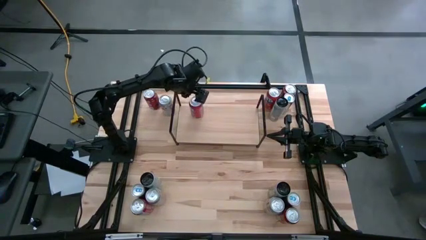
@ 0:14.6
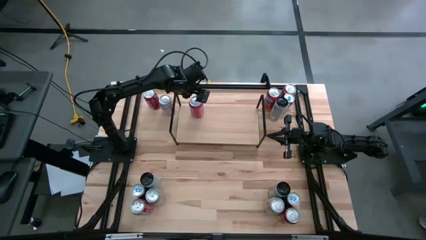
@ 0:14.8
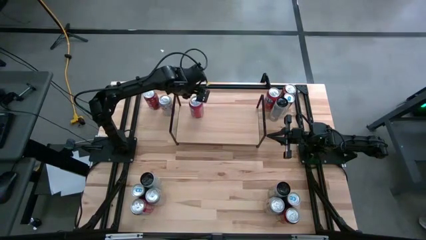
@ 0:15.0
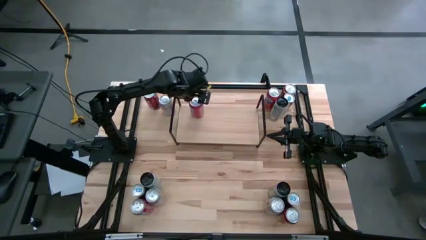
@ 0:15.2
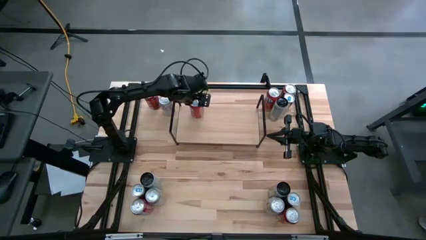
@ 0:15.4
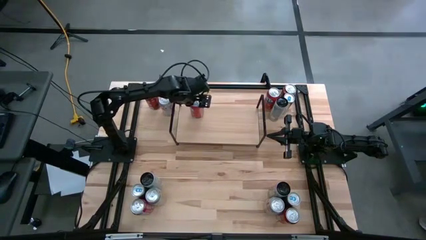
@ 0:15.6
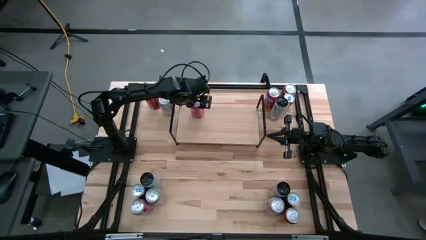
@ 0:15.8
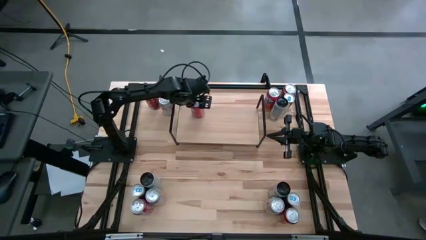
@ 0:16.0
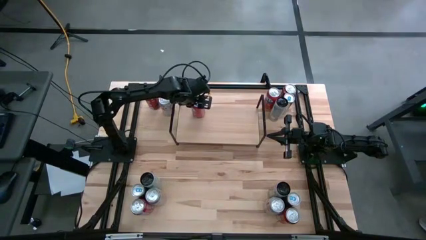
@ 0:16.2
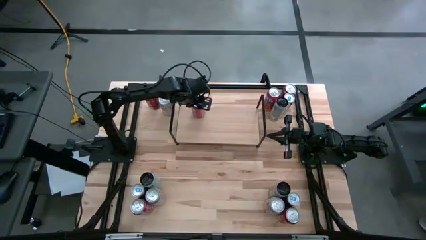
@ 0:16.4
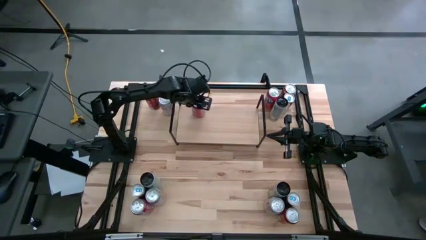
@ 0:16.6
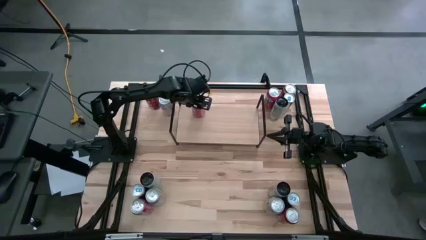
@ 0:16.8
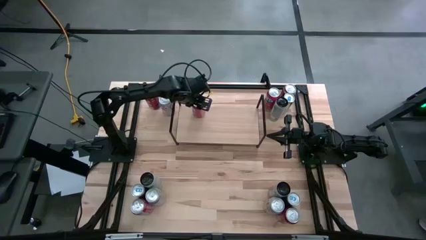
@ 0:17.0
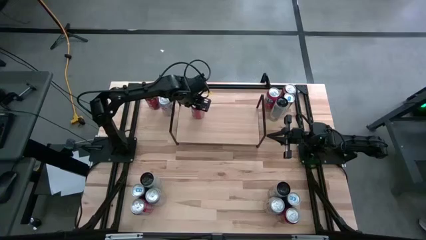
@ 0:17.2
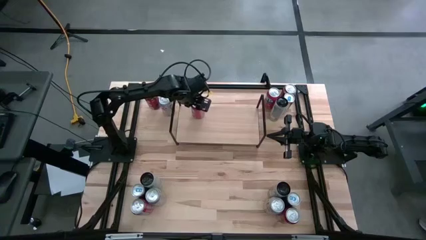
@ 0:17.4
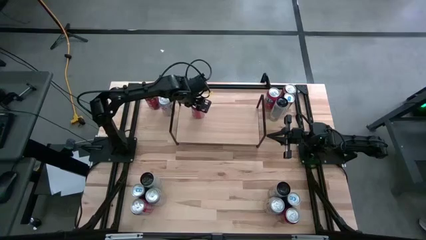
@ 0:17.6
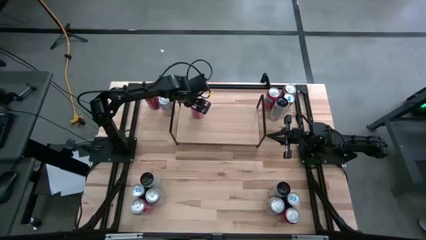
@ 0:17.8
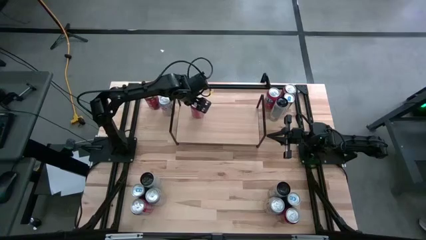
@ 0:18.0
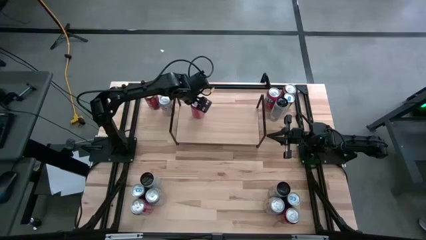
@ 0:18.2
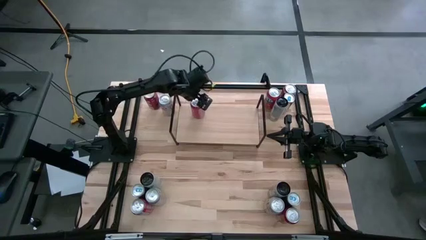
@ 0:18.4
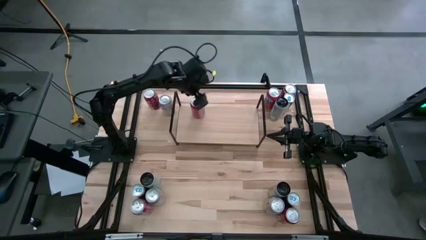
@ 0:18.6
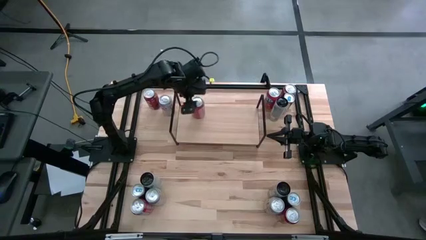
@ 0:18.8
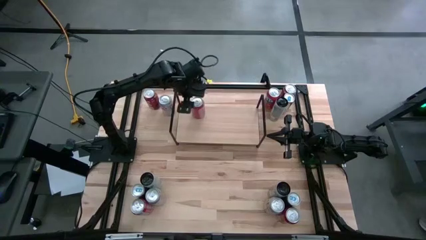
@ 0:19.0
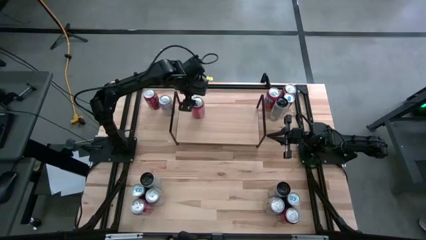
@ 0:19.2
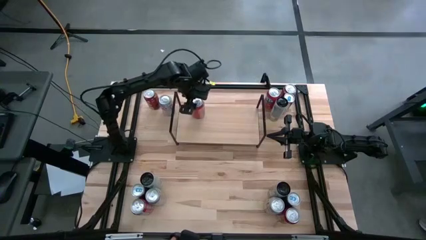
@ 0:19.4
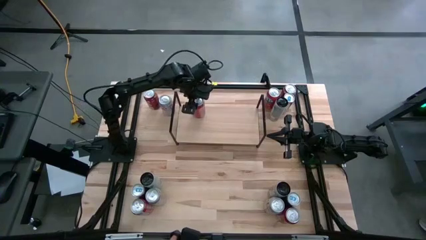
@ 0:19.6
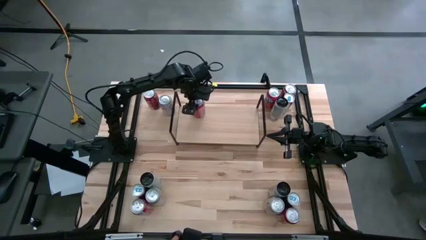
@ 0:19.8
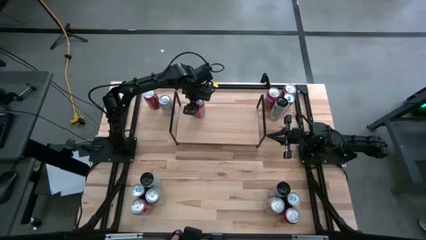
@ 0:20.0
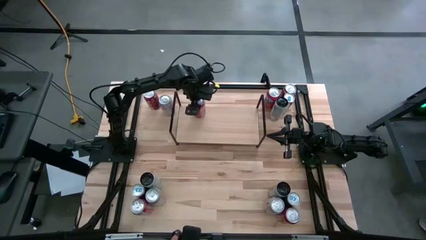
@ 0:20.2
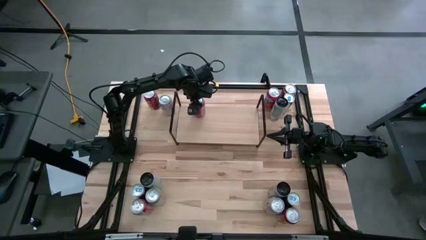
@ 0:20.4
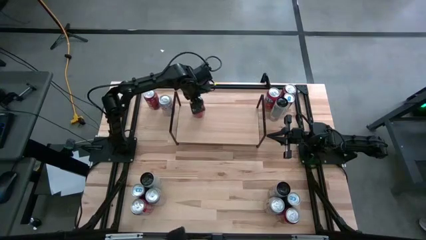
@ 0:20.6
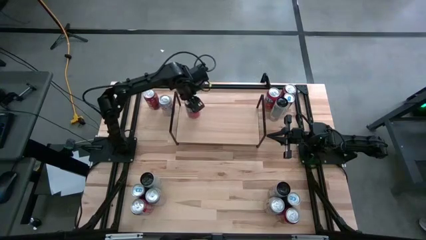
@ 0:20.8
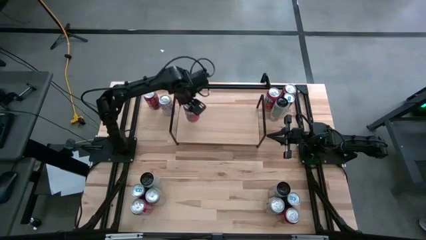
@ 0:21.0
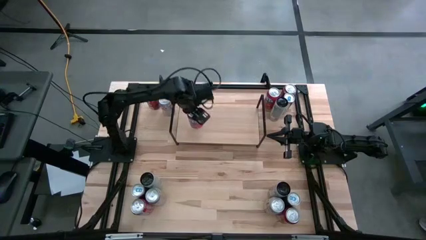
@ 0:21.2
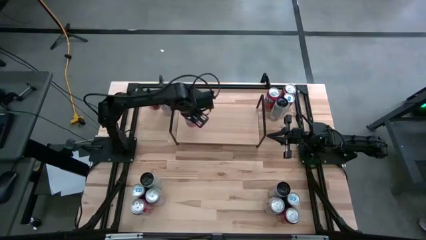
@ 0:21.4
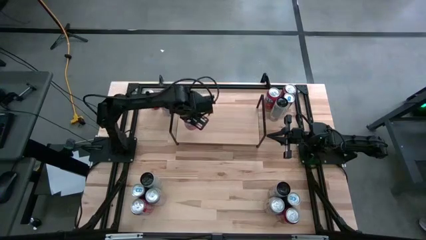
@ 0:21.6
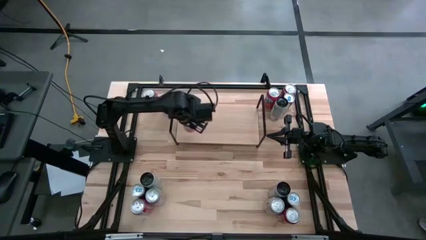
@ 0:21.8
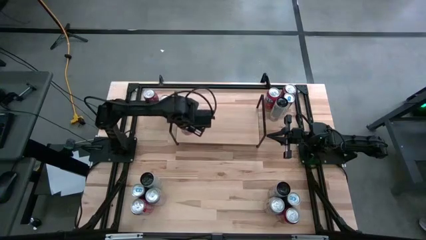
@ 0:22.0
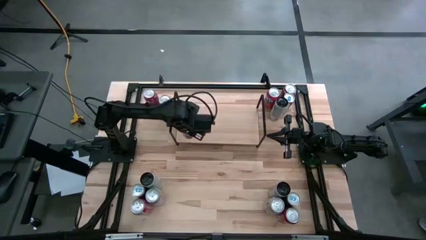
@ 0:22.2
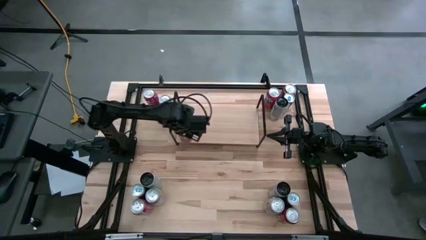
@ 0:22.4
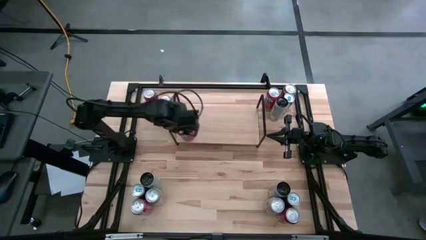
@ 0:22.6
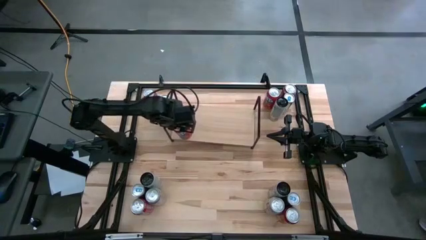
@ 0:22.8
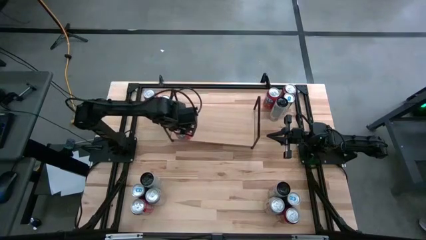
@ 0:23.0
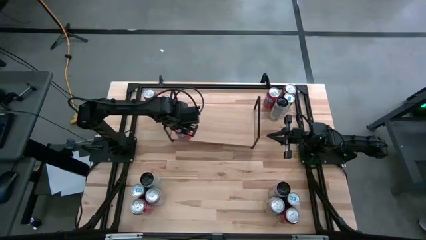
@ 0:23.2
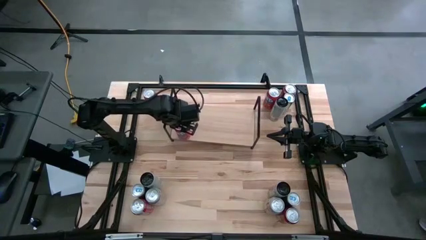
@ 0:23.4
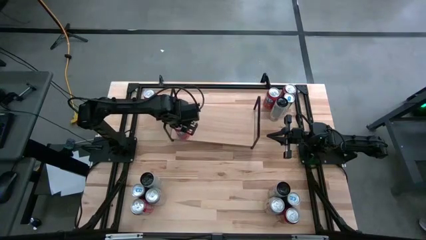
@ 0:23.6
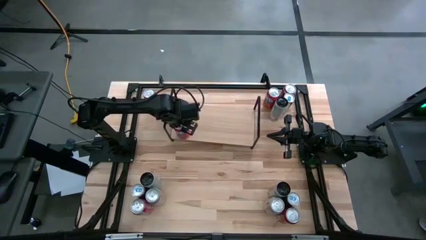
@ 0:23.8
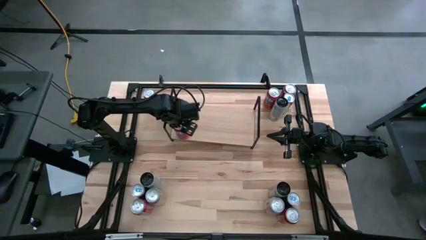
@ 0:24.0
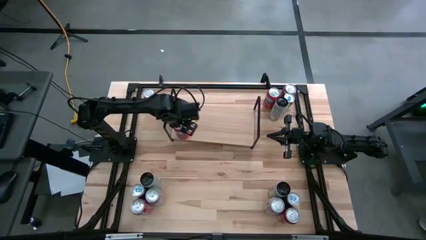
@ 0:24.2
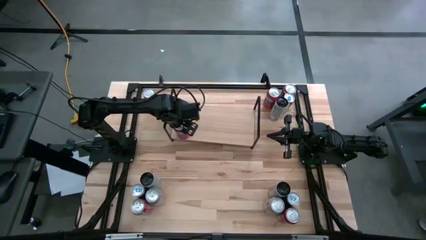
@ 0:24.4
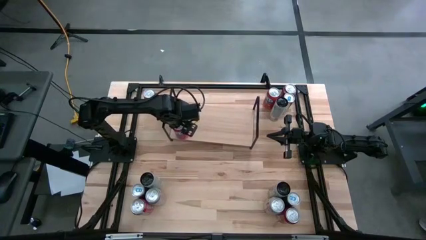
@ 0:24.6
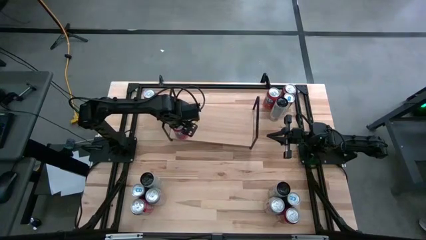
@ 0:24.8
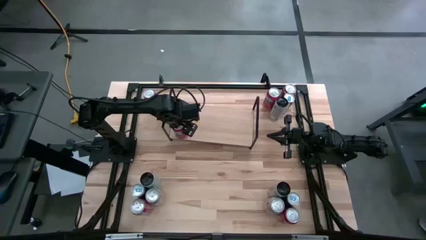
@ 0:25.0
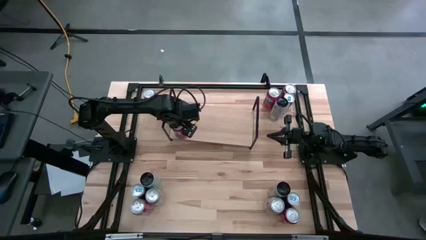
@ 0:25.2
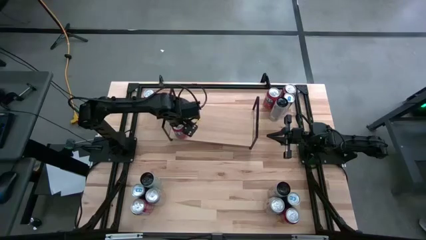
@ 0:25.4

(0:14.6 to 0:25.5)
Task: Place canned beverage on shelf
Put the top left red soda can on the shelf

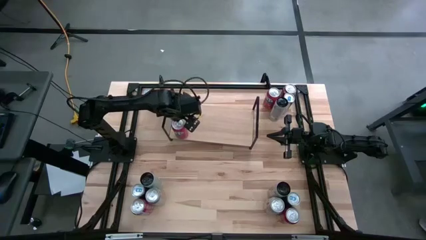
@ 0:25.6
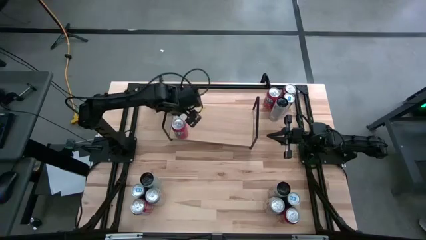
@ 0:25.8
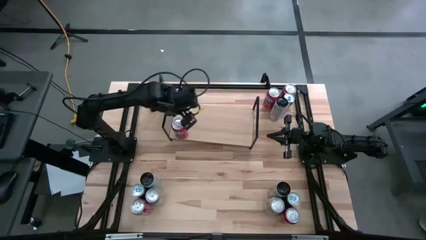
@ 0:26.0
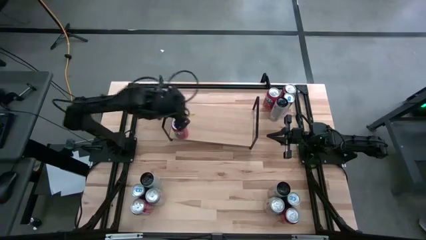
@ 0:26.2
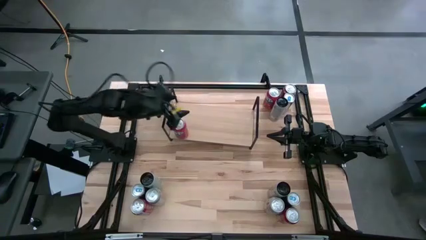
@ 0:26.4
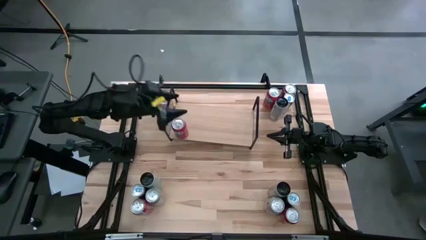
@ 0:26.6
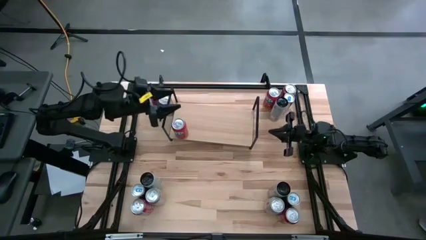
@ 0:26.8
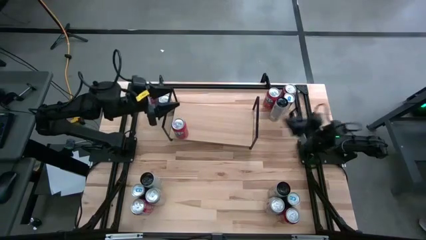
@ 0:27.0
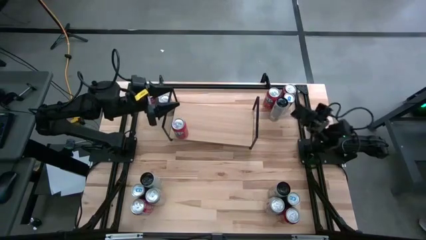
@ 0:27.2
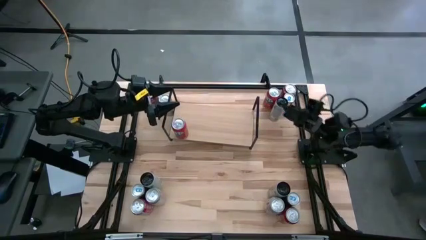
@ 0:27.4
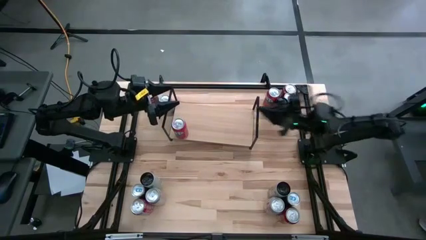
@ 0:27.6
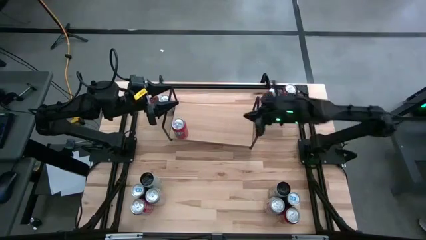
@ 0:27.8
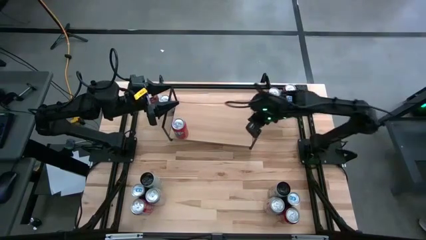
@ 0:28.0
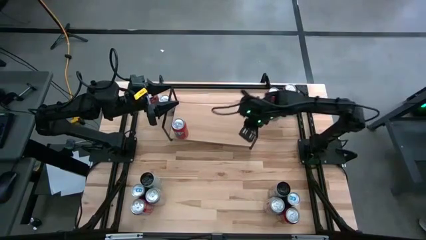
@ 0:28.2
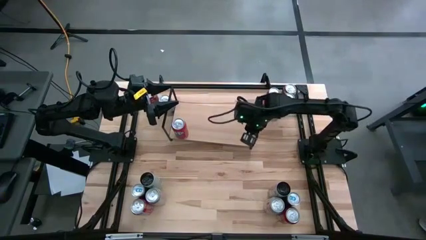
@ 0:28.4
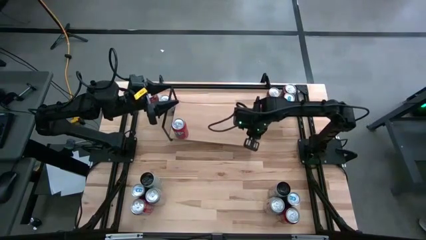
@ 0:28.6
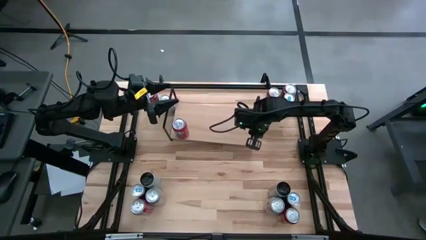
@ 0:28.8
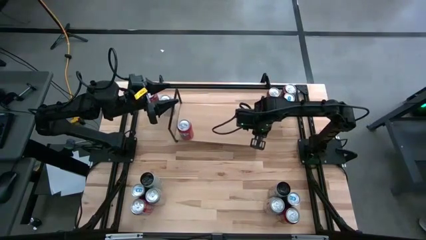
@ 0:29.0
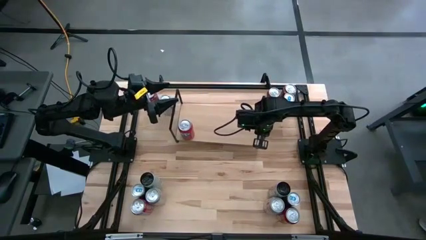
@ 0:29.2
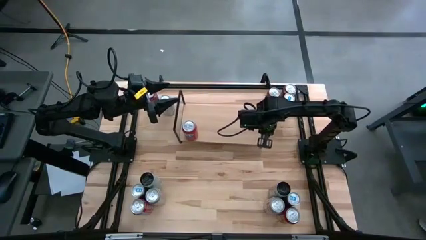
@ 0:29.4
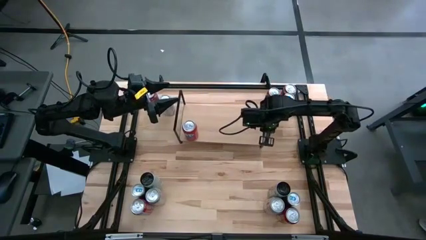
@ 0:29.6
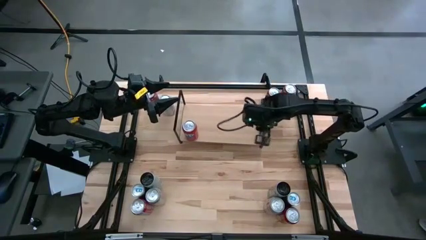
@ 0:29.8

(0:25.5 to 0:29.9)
Adjust the shelf

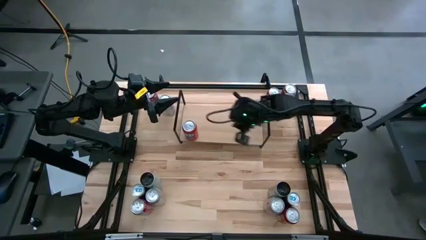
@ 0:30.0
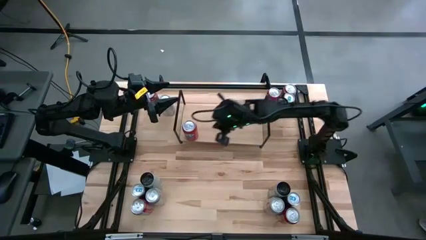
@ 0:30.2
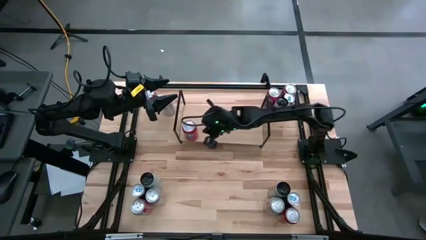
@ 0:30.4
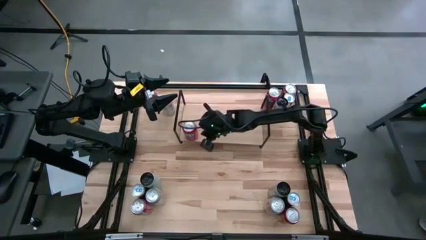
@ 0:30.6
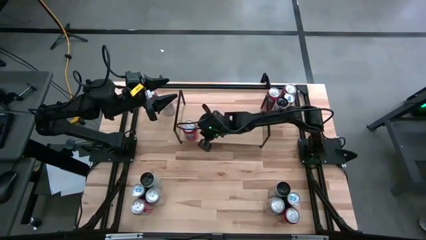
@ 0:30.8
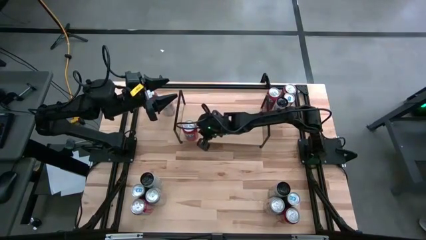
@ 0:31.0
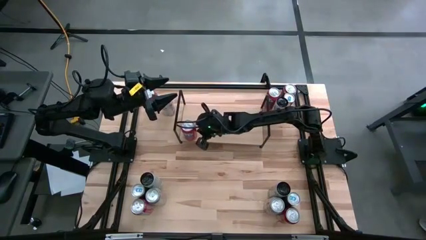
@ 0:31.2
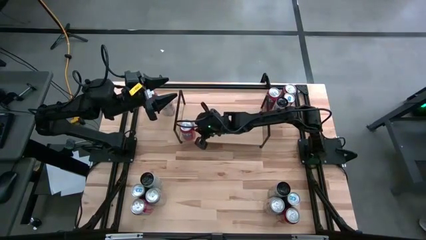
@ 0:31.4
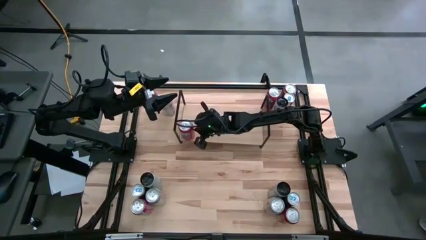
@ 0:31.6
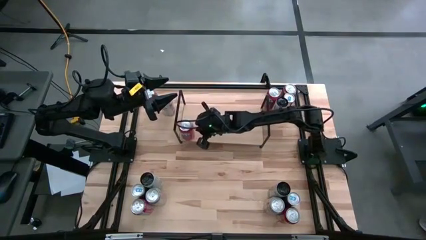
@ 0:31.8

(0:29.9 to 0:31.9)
Adjust the red soda can on the shelf
